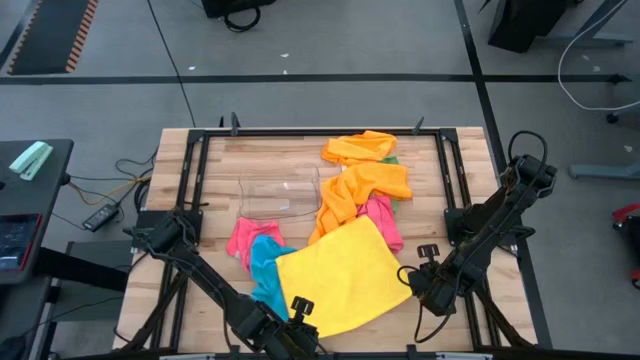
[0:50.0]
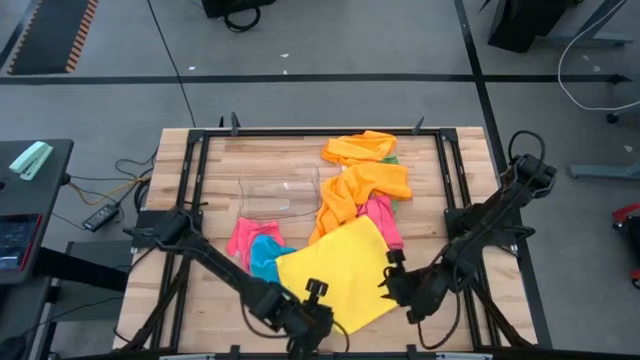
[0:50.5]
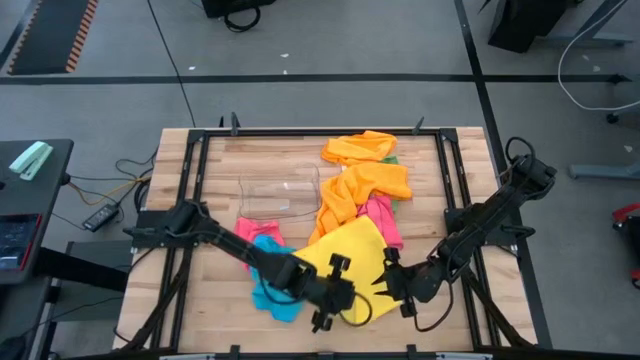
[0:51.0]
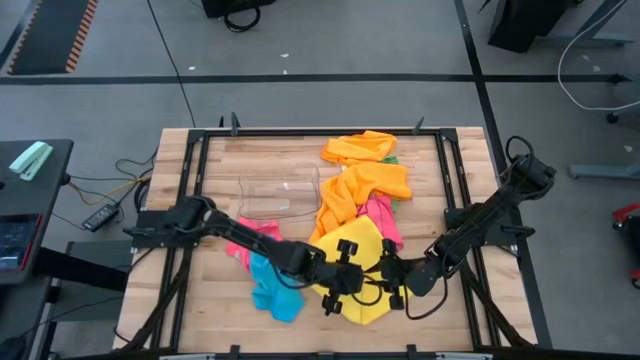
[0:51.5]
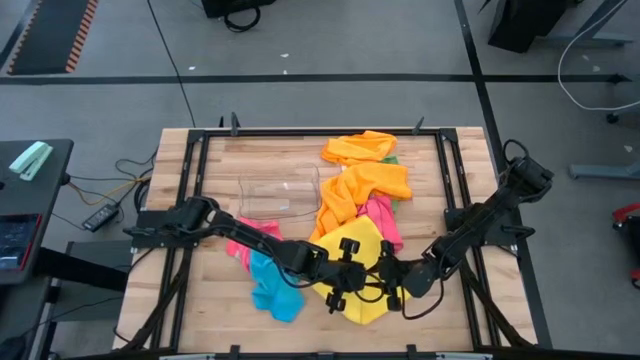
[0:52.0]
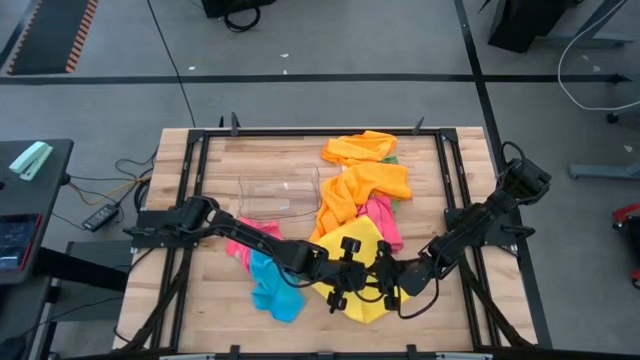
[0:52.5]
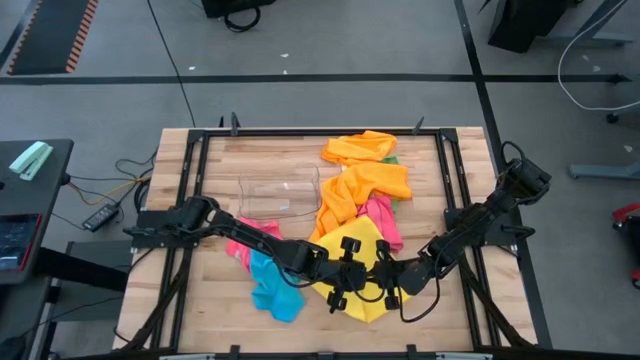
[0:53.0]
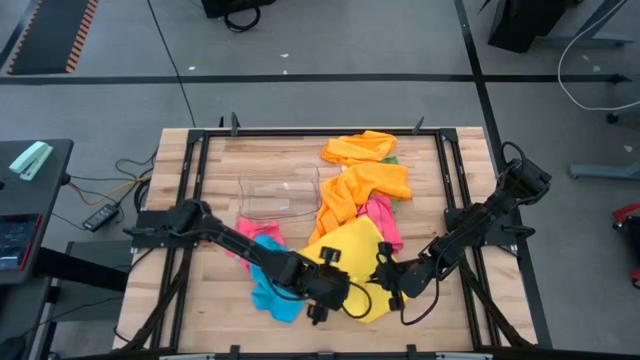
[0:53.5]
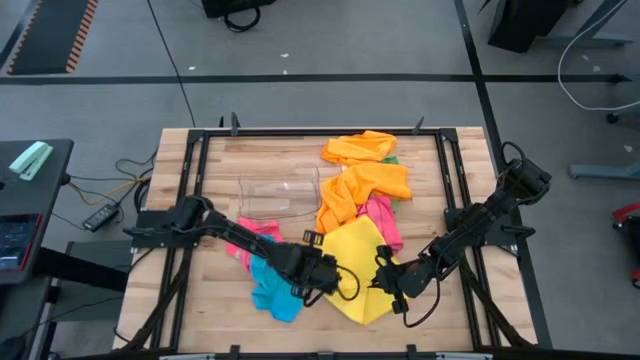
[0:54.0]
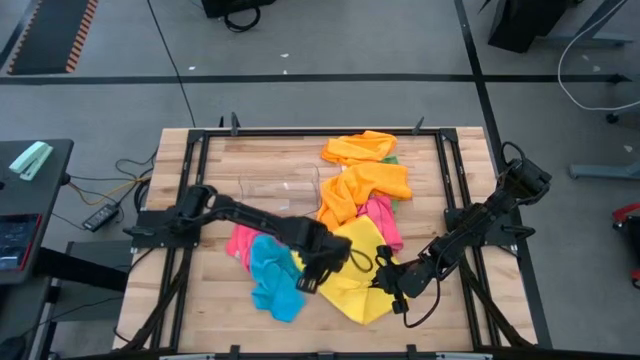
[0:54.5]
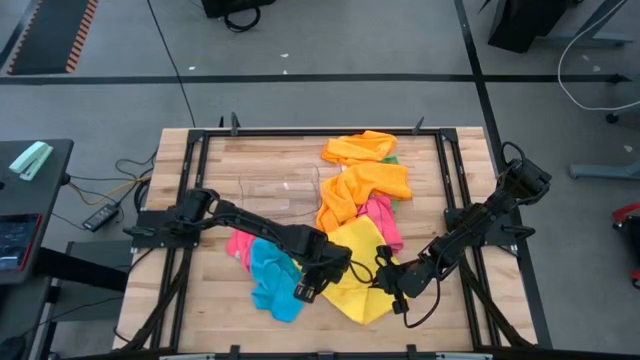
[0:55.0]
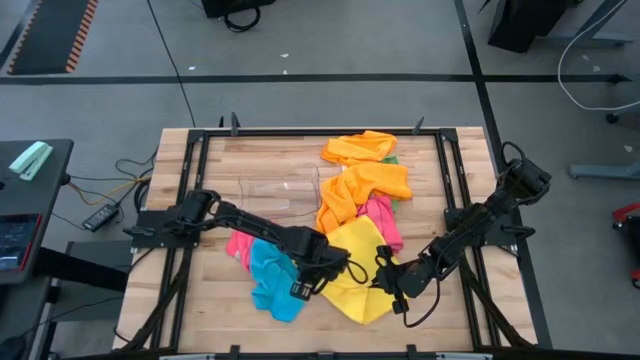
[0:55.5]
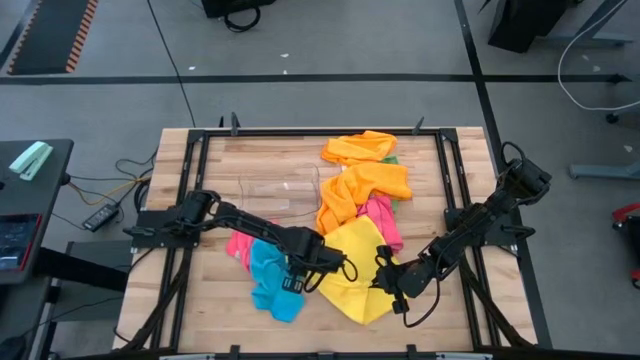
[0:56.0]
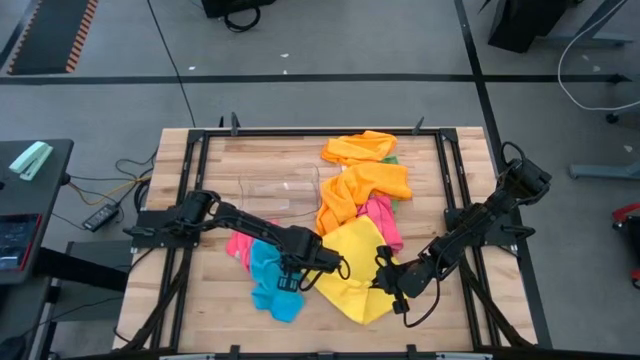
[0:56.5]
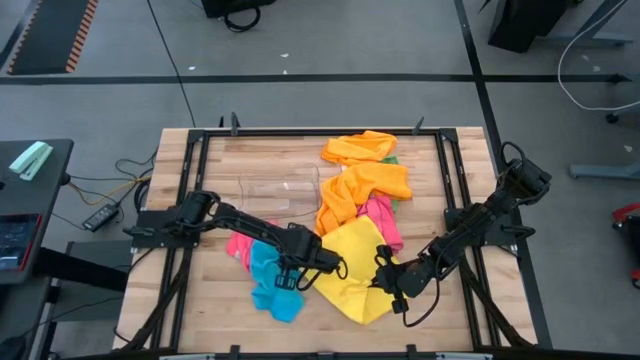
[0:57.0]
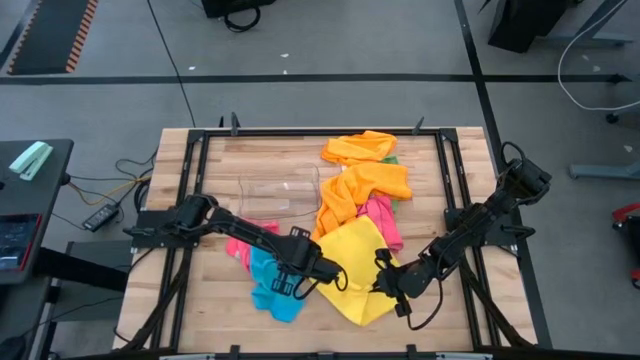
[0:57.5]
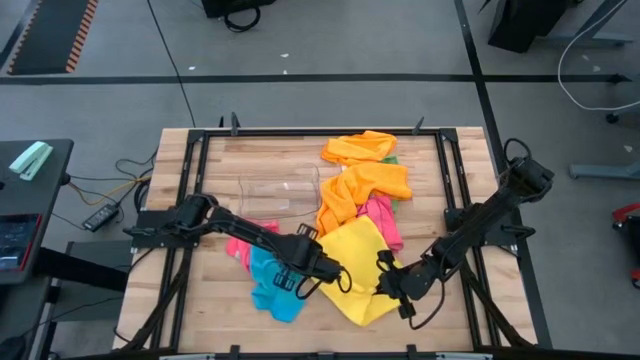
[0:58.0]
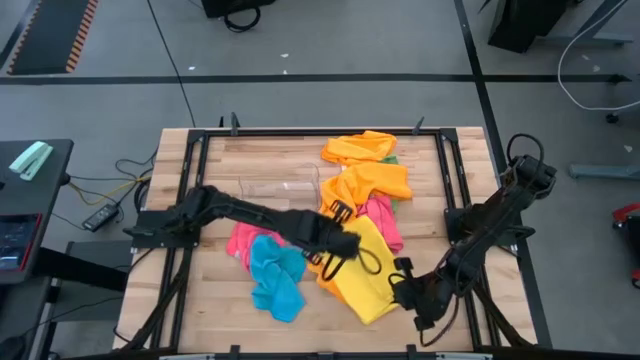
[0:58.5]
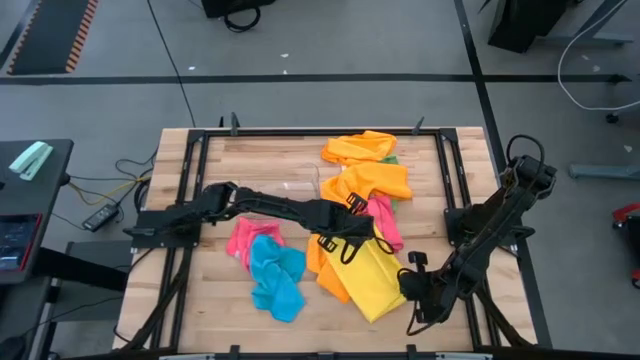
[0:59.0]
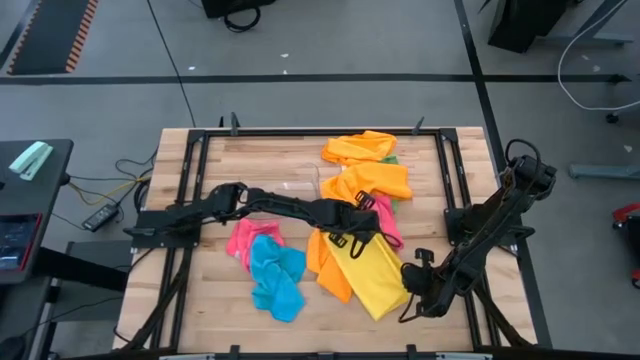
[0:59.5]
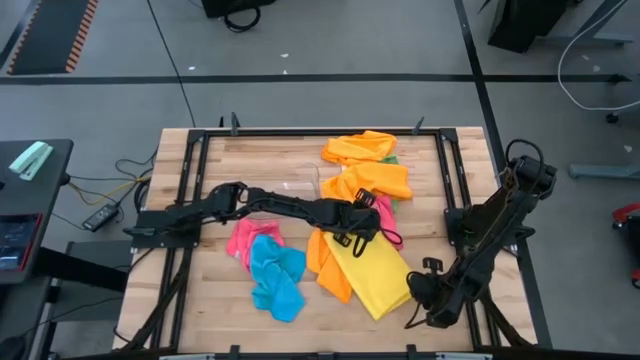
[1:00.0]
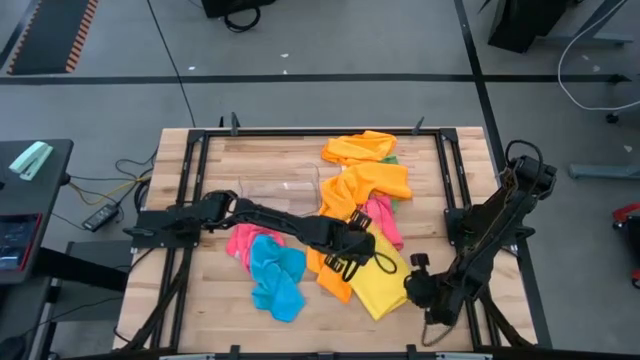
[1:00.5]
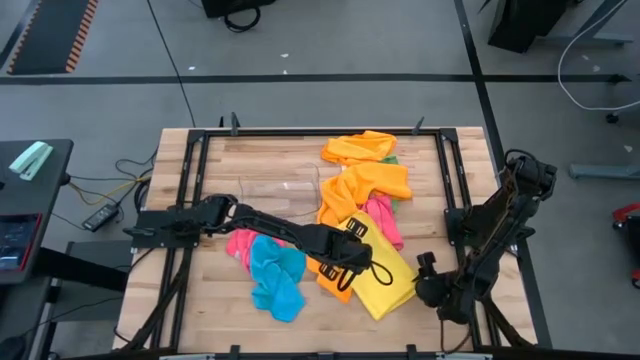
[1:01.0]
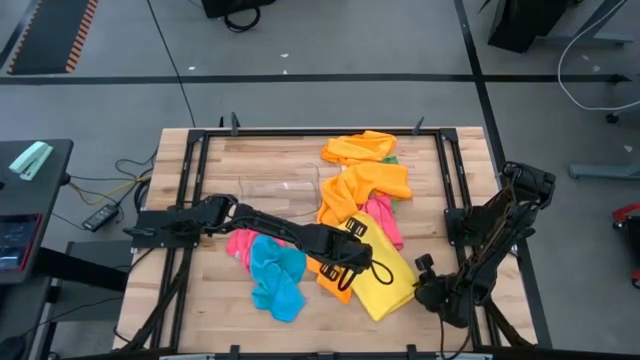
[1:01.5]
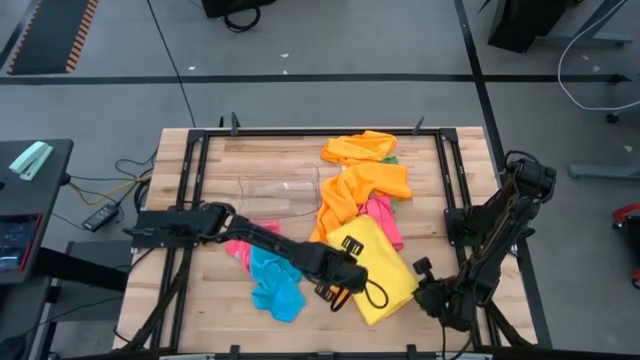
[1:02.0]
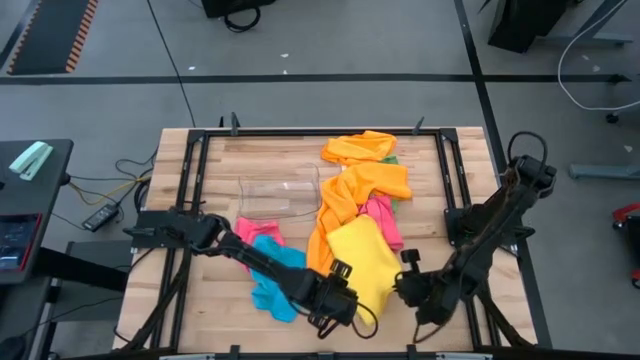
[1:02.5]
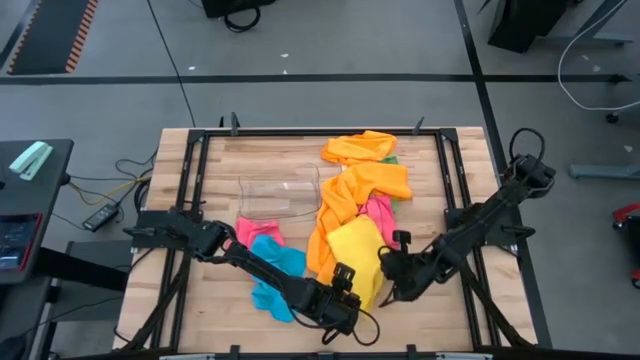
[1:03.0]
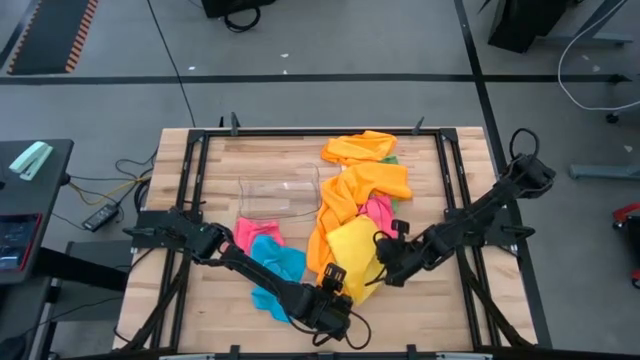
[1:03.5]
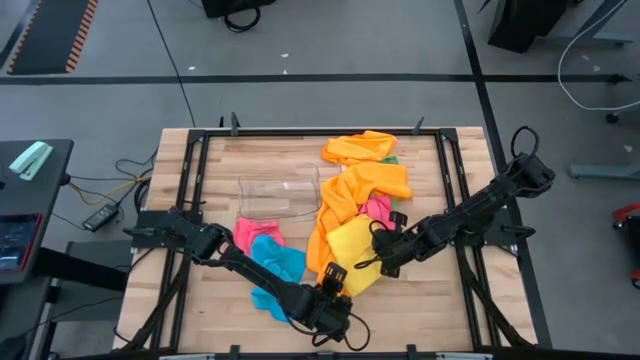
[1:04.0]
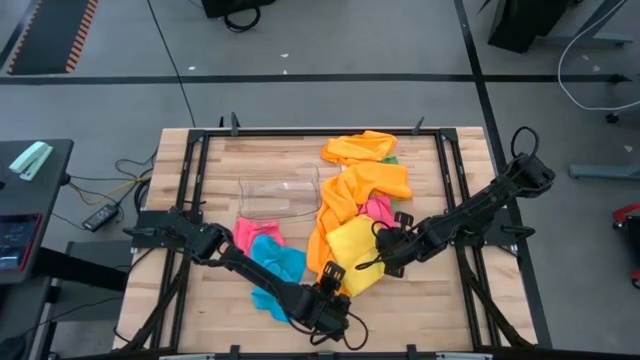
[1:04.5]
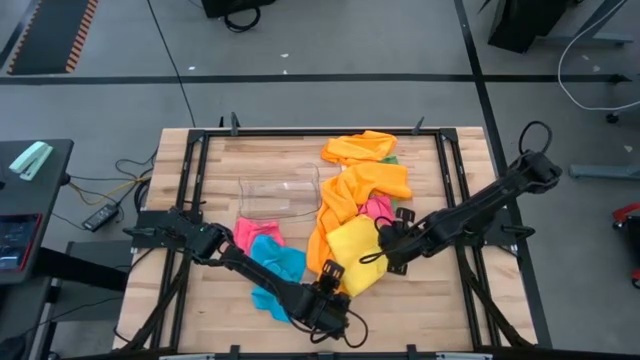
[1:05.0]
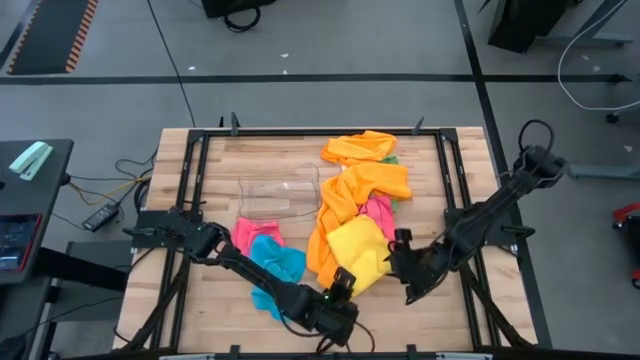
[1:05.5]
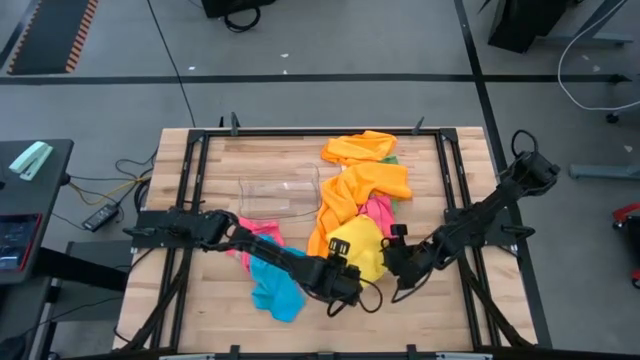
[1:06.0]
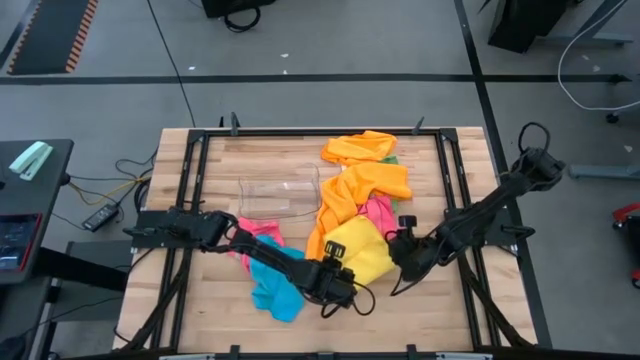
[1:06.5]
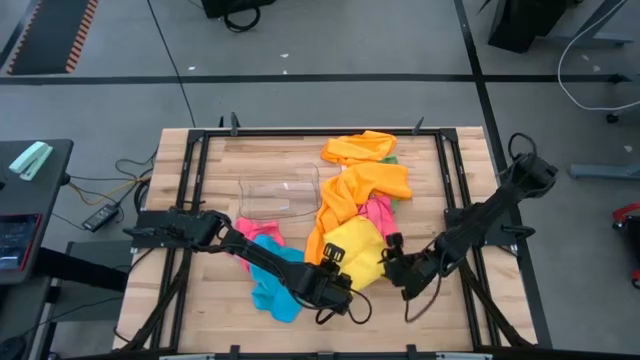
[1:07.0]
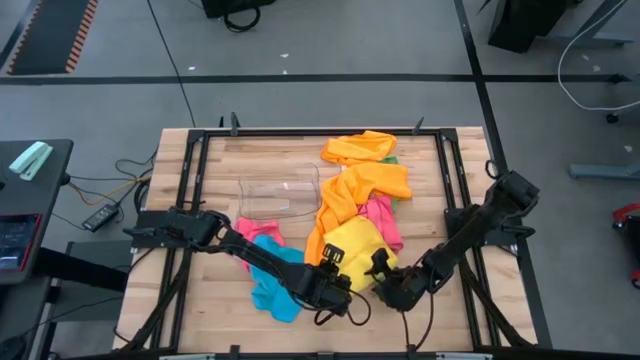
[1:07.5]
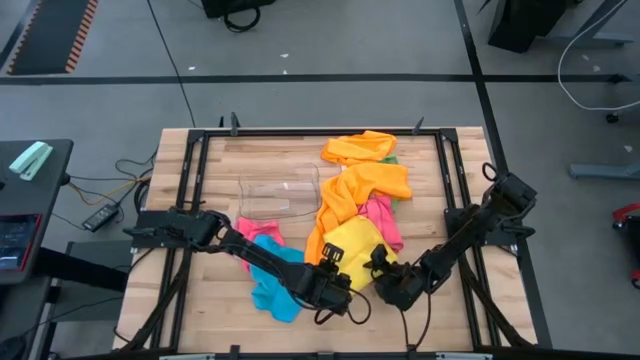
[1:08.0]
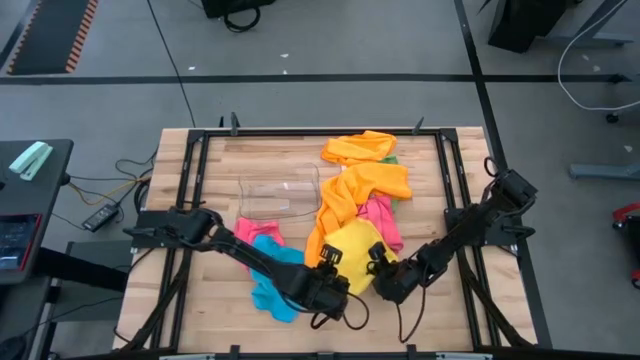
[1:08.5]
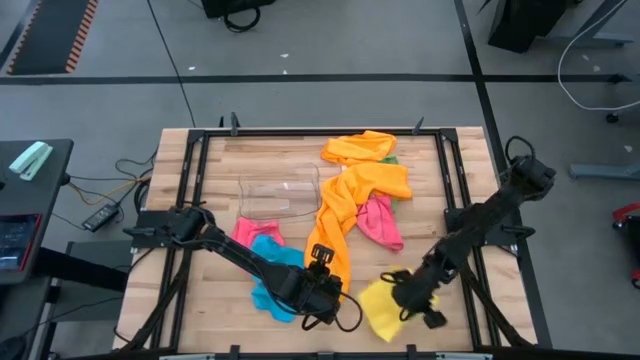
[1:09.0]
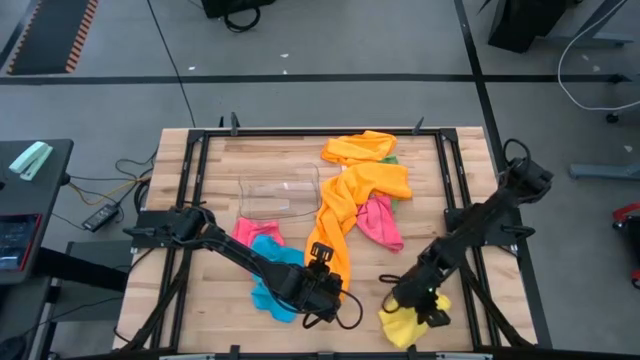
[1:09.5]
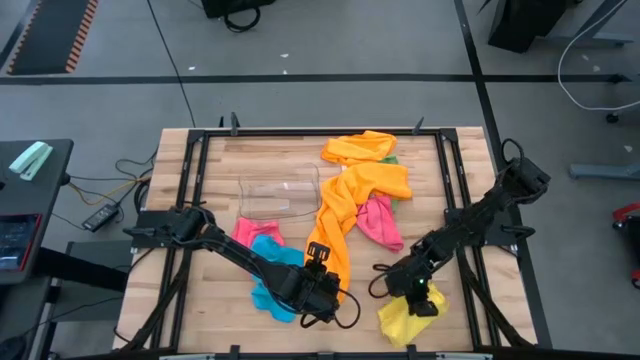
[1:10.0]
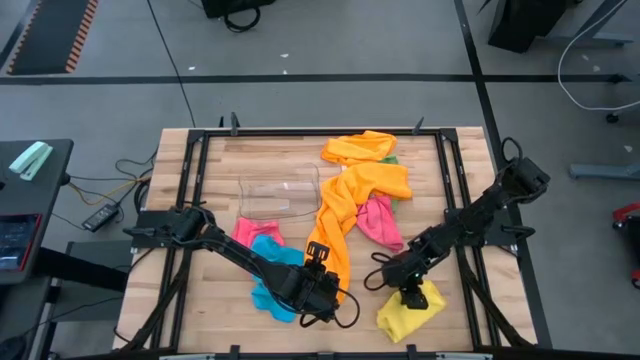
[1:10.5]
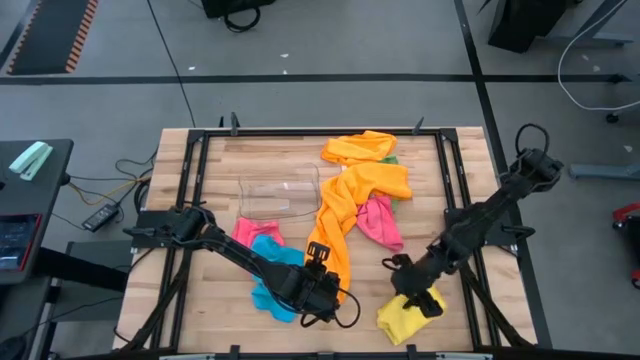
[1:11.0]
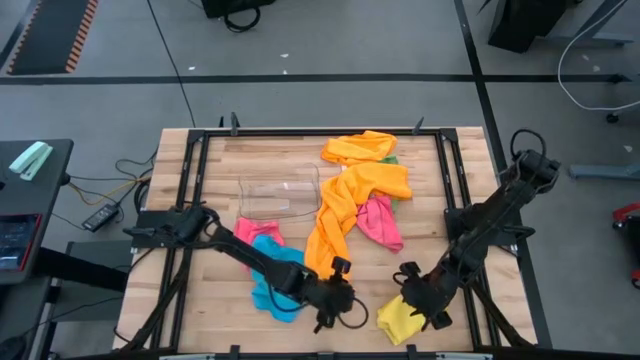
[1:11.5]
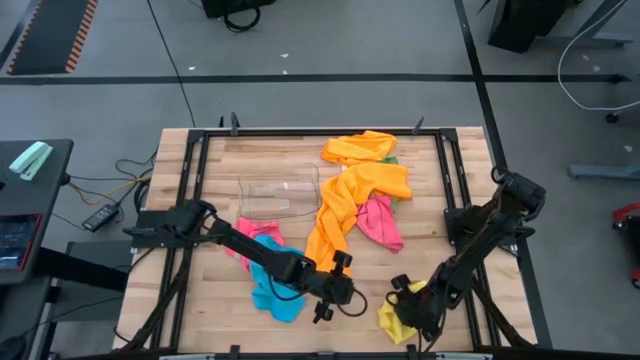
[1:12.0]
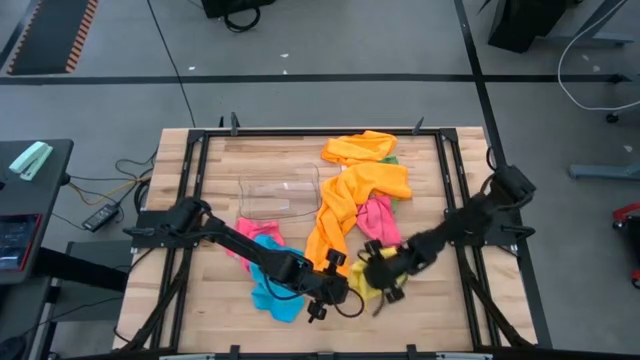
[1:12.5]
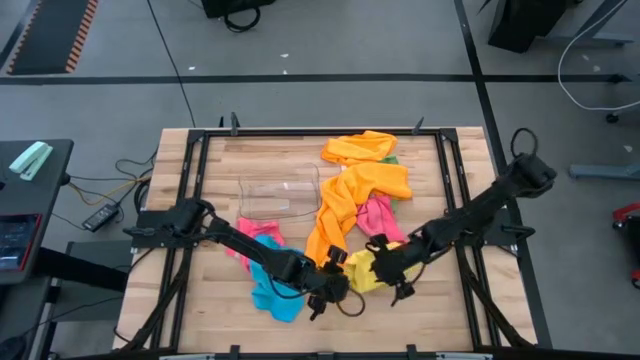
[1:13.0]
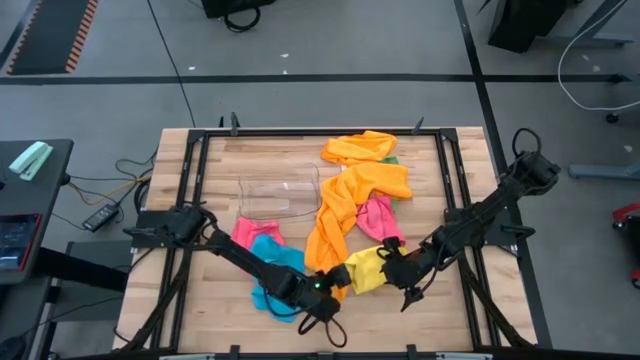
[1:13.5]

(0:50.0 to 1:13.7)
Task: Fold microfiber towels
Fold the yellow microfiber cloth
